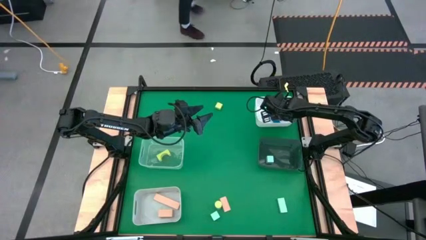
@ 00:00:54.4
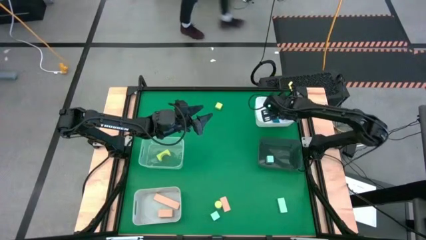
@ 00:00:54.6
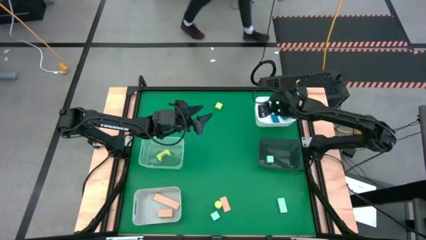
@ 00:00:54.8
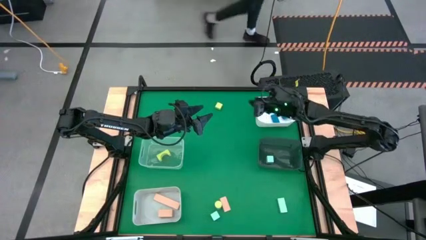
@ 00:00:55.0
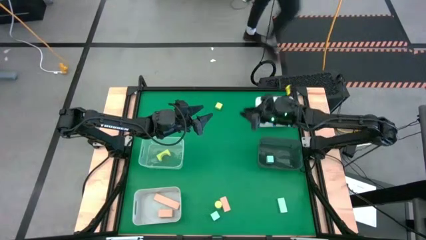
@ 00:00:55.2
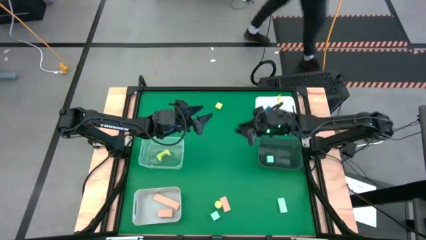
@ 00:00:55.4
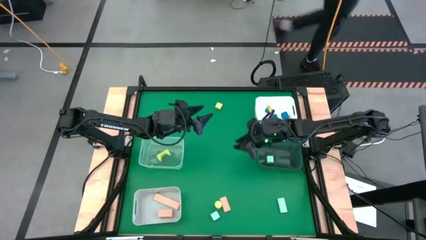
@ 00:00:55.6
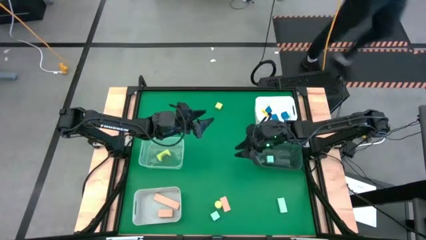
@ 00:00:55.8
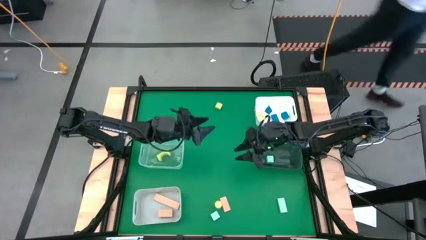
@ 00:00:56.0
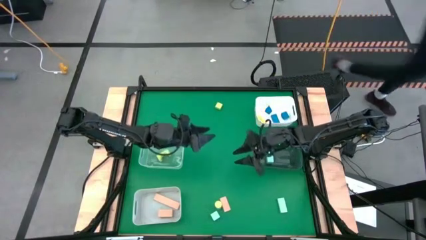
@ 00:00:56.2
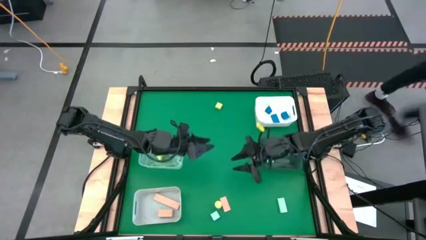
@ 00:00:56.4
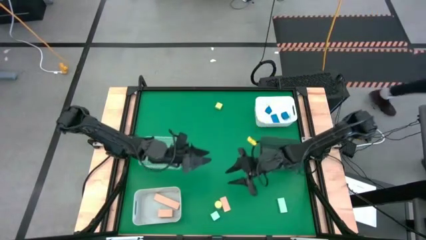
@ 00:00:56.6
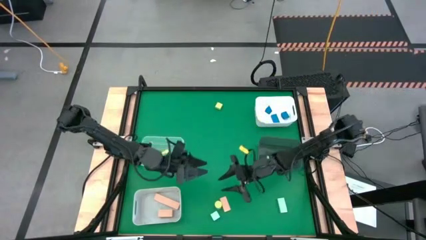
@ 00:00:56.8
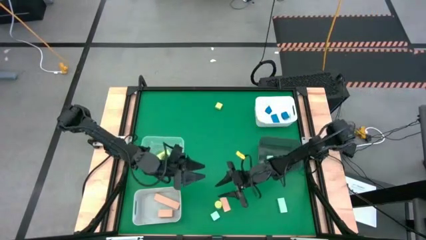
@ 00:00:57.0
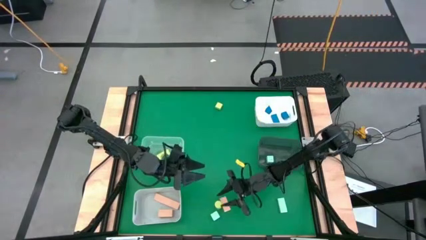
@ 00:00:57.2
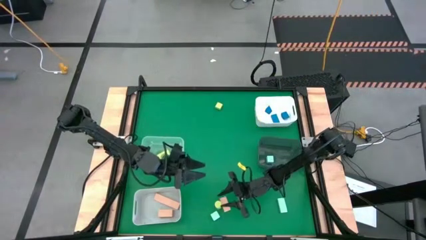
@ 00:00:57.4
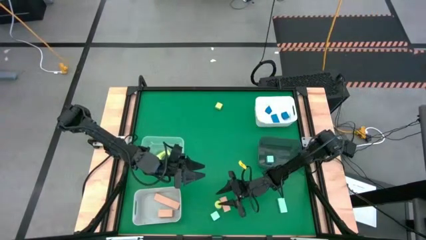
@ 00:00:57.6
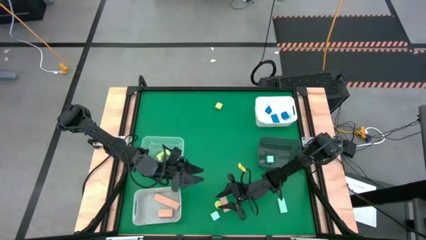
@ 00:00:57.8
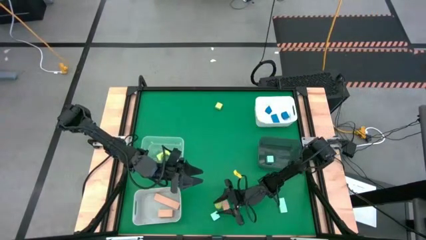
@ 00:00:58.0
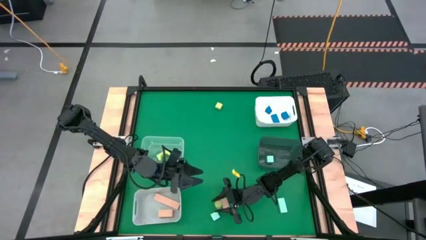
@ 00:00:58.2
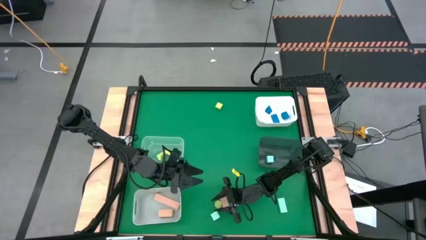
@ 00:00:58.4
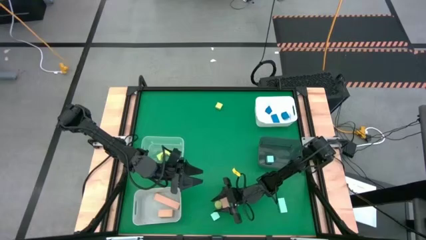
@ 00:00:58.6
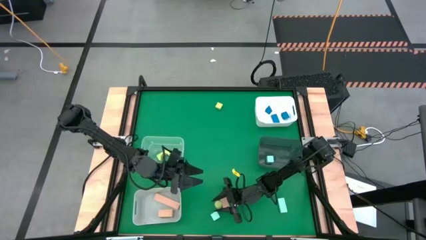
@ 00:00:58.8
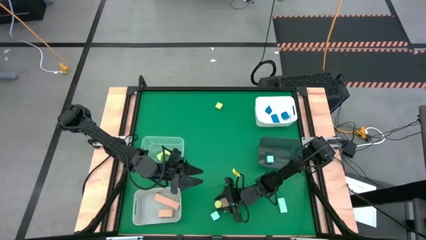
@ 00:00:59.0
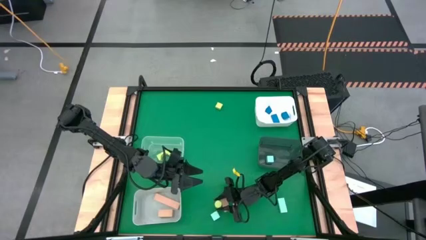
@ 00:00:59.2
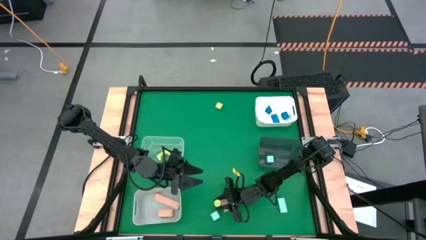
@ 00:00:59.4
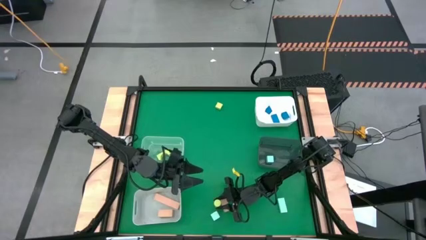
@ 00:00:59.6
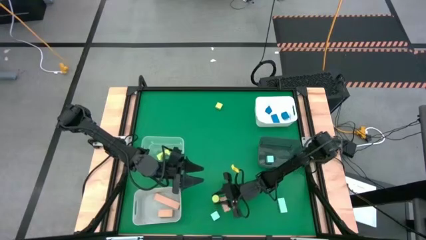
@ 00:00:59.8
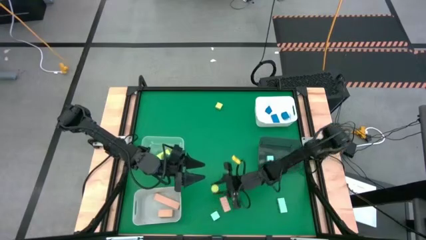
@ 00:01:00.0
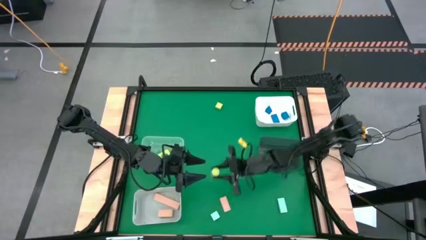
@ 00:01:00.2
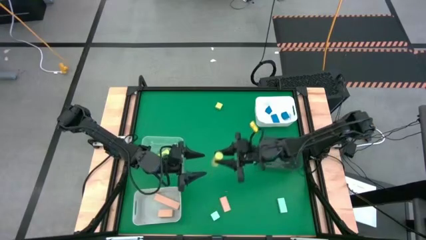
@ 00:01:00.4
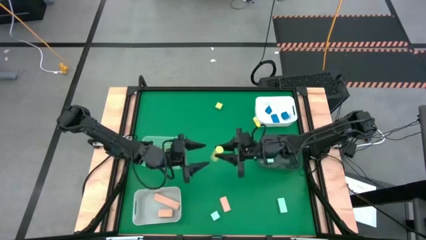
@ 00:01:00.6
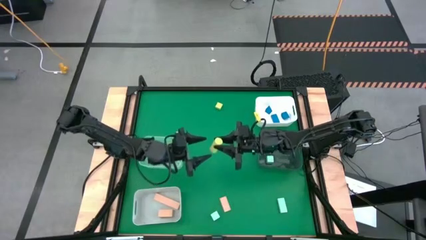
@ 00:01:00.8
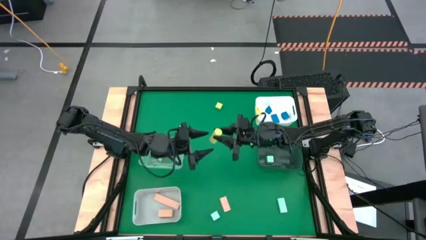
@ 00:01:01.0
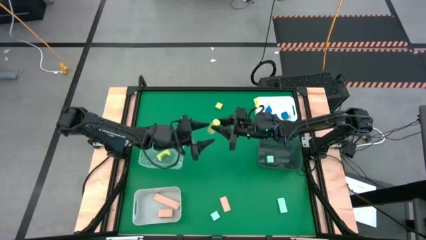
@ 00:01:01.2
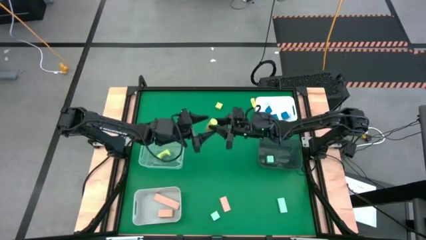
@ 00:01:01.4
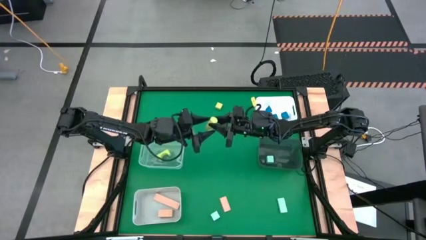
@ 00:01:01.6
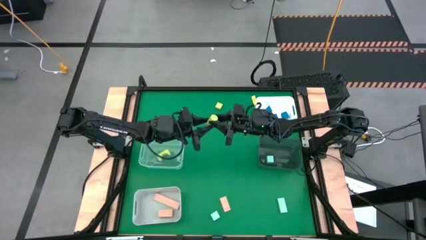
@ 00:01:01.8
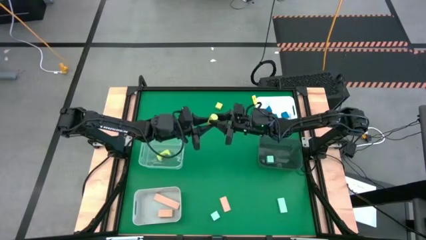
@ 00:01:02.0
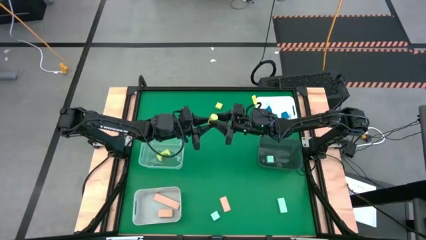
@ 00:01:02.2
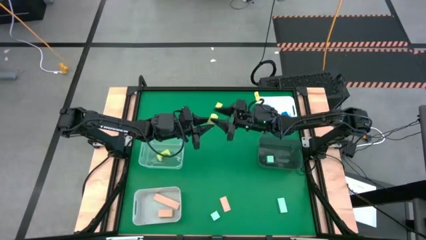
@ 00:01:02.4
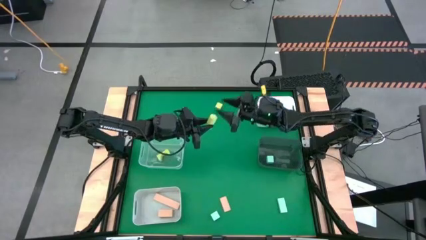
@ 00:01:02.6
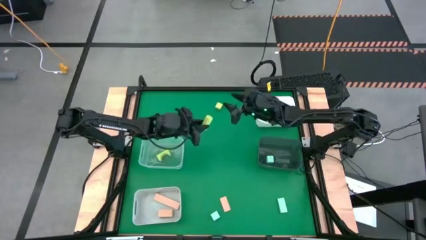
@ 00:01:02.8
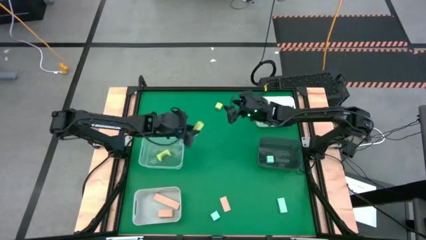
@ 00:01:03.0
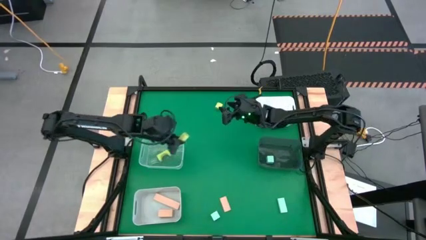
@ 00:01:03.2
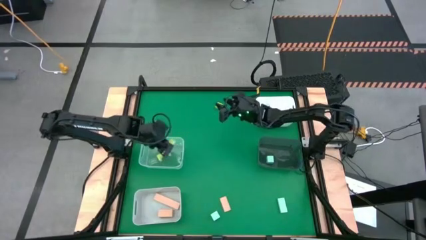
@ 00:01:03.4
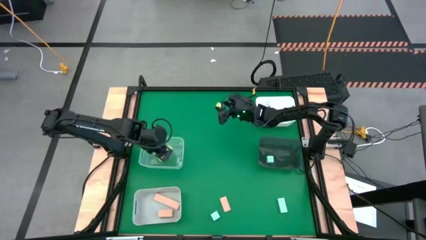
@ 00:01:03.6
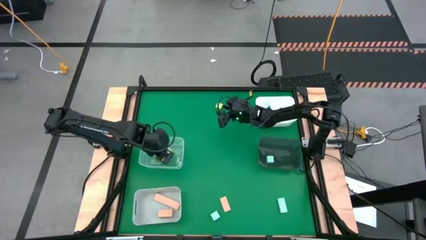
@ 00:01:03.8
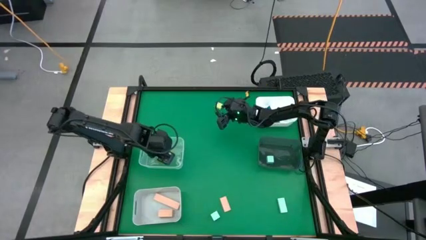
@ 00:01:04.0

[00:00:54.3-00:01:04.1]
Task: Sort & place blocks by color
Put the green block into the transparent bin

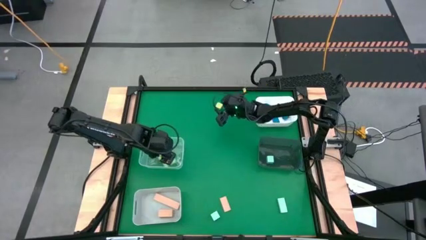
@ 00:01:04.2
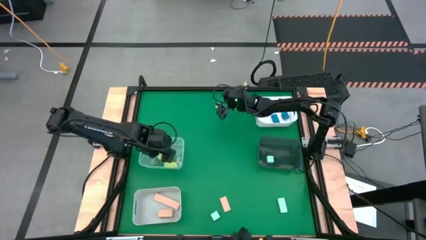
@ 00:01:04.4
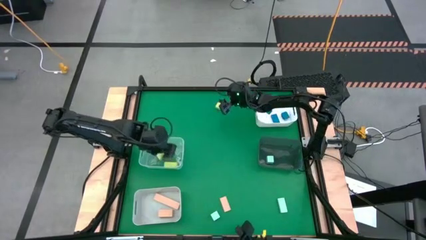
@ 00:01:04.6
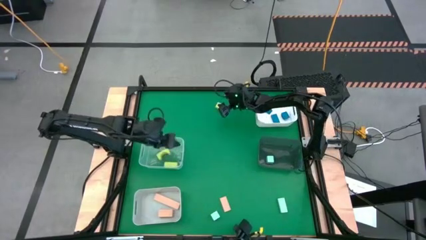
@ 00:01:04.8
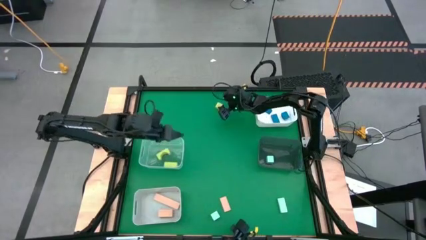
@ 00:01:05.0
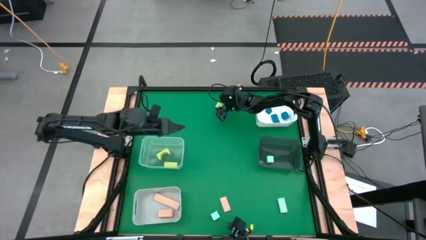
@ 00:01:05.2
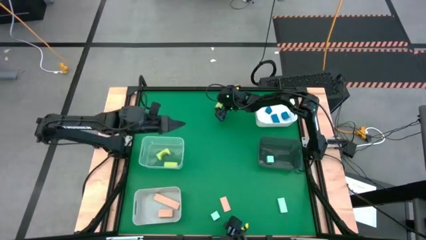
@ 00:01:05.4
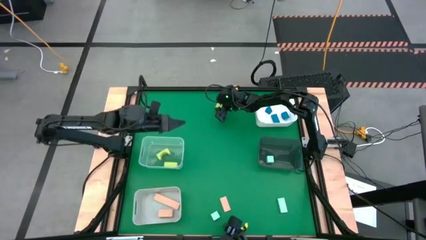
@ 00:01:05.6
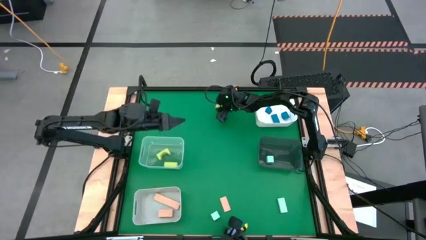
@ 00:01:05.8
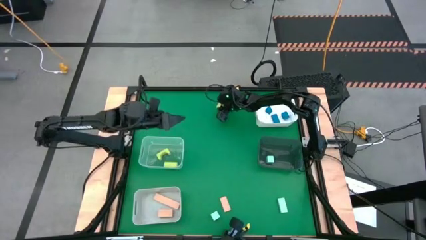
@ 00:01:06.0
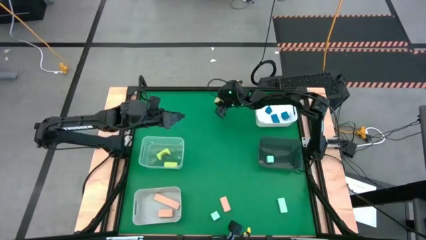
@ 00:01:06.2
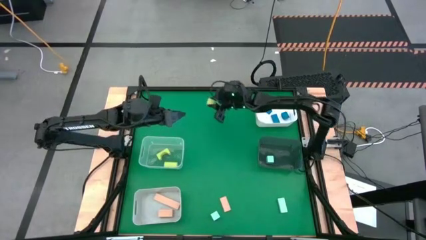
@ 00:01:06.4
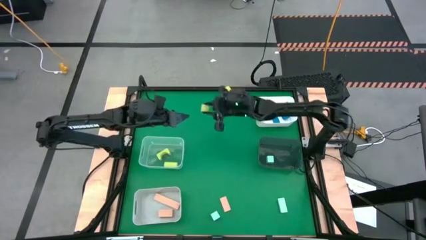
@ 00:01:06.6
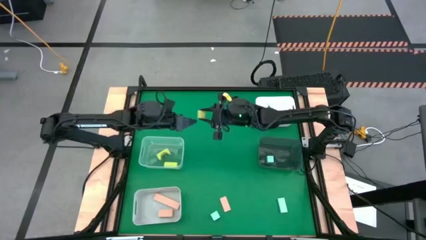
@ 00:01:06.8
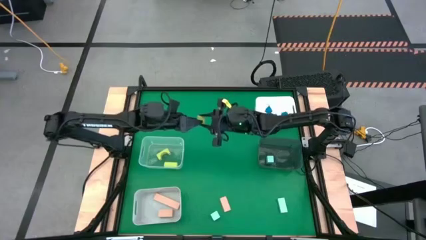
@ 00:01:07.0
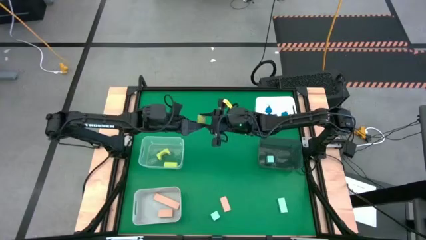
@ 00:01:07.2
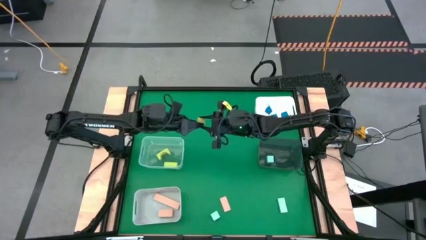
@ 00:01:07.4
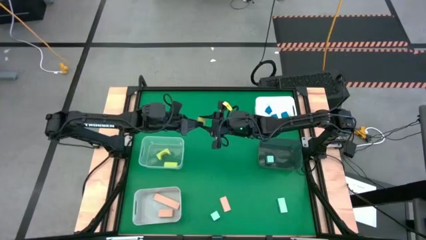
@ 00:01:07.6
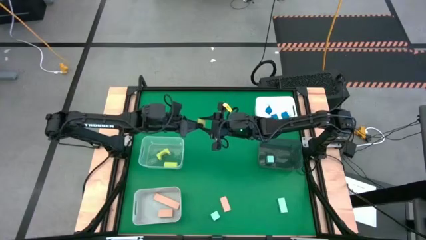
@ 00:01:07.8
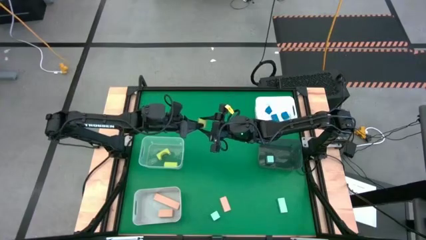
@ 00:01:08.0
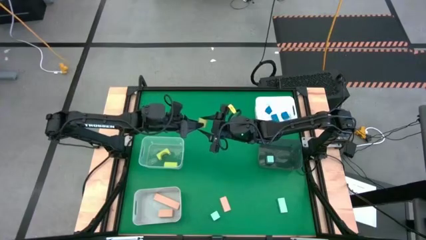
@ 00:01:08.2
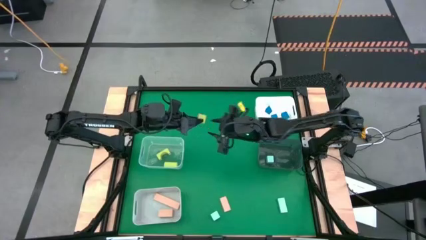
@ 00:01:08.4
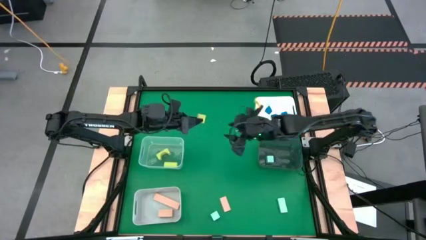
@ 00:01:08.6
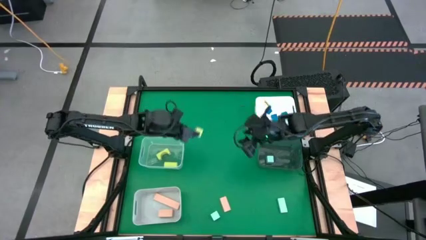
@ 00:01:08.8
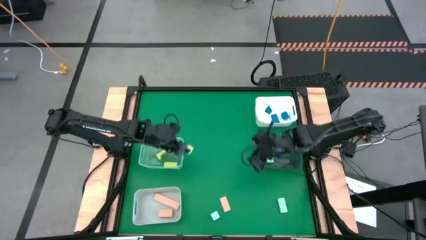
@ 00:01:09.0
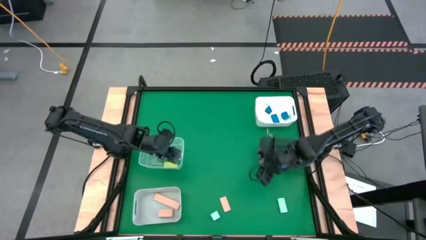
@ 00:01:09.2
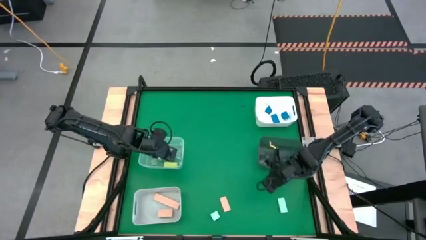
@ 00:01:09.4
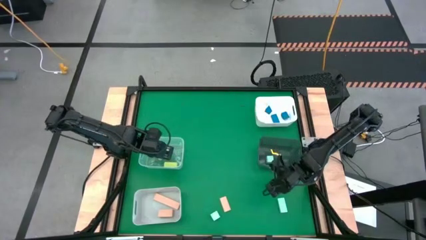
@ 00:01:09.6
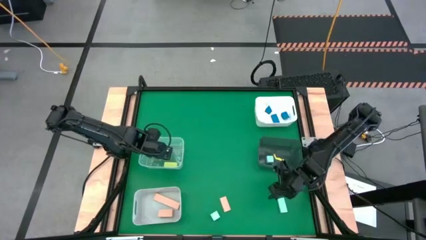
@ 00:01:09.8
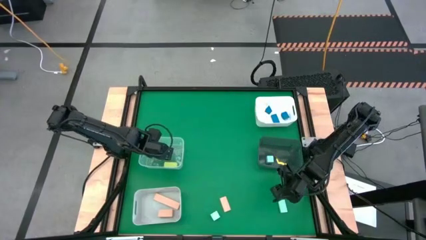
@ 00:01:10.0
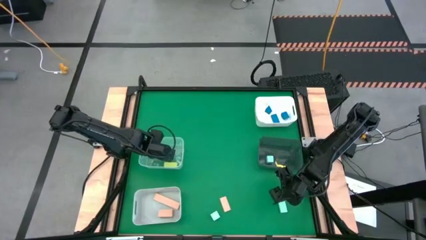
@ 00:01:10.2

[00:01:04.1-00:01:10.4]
Put the green block into the transparent bin
